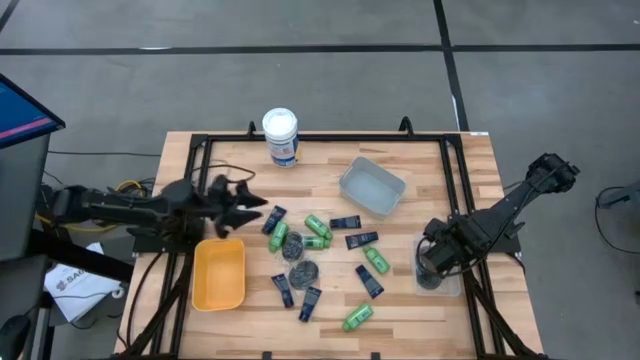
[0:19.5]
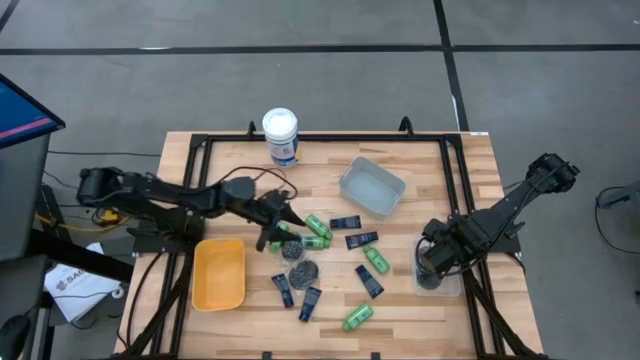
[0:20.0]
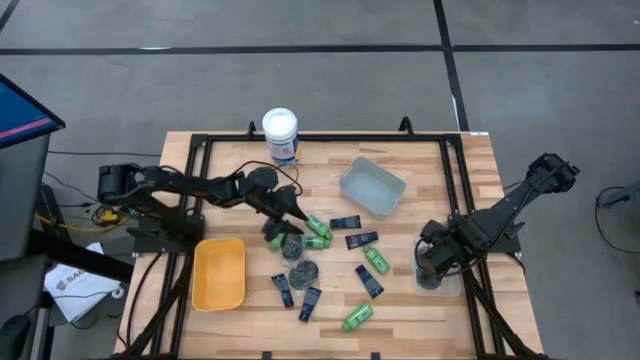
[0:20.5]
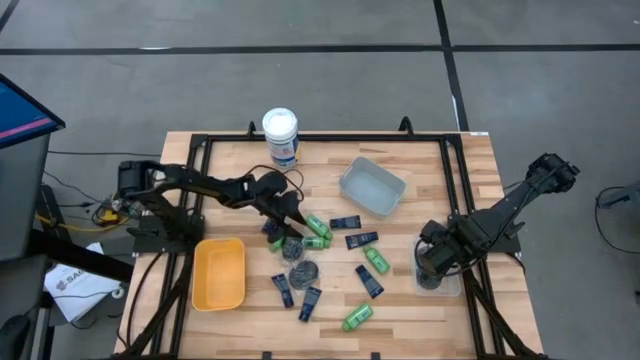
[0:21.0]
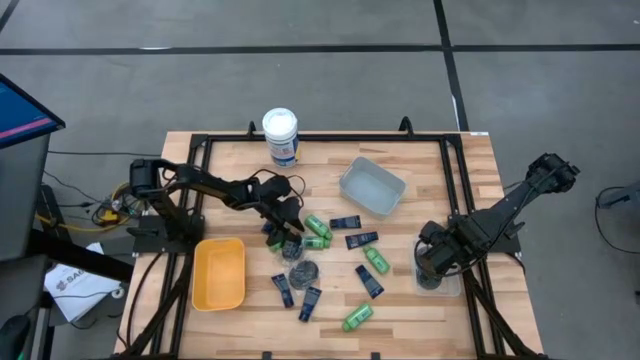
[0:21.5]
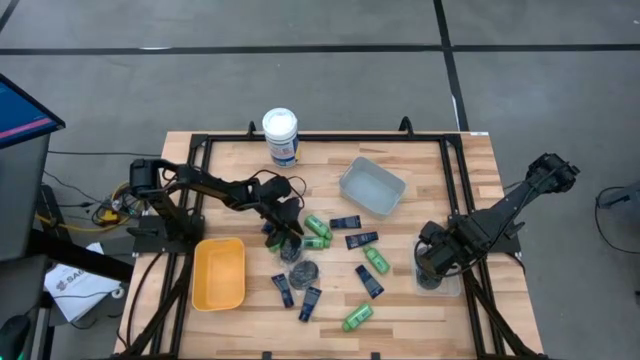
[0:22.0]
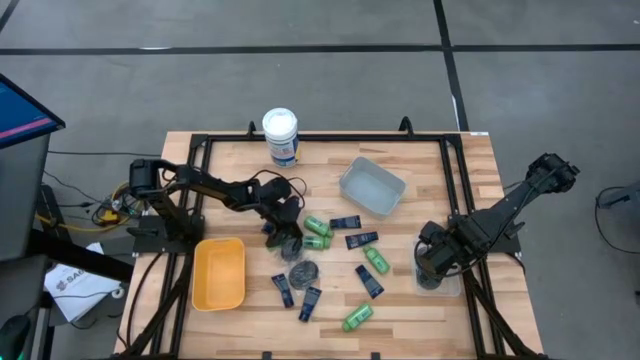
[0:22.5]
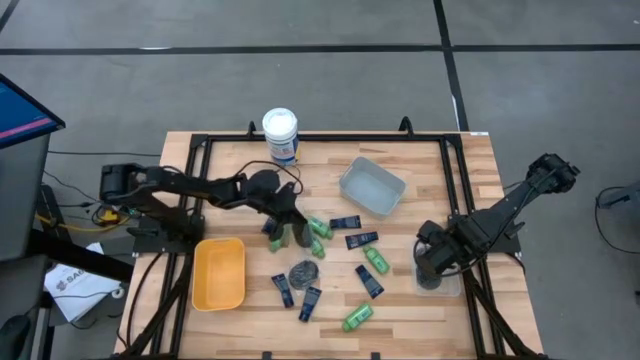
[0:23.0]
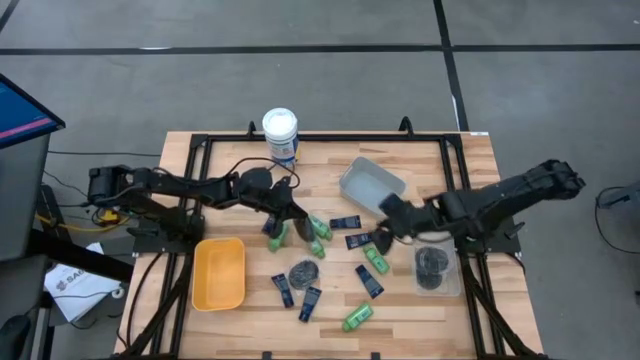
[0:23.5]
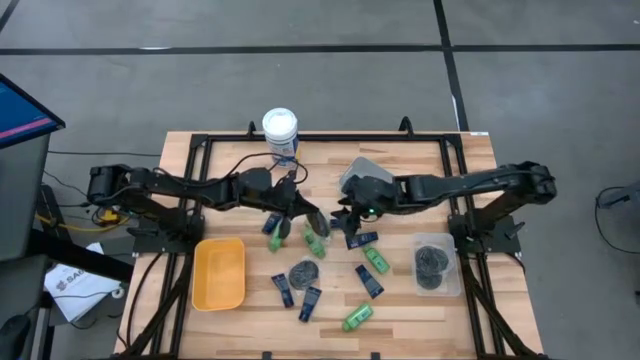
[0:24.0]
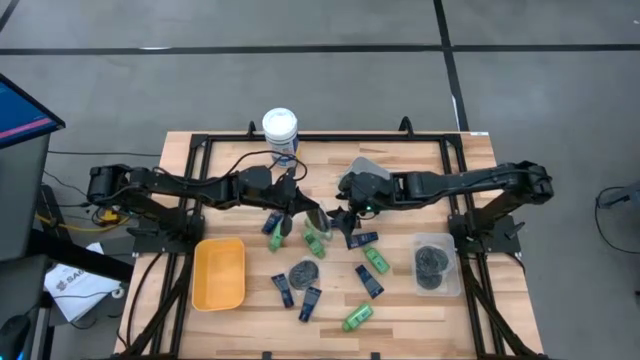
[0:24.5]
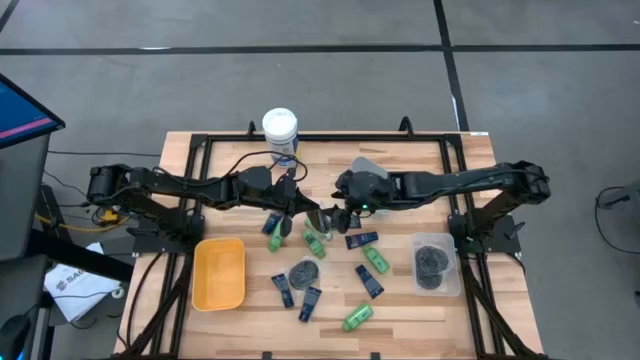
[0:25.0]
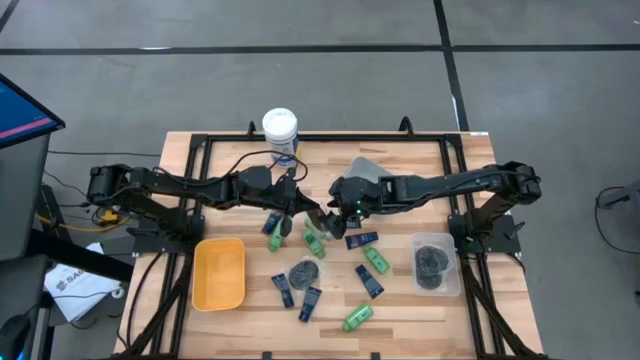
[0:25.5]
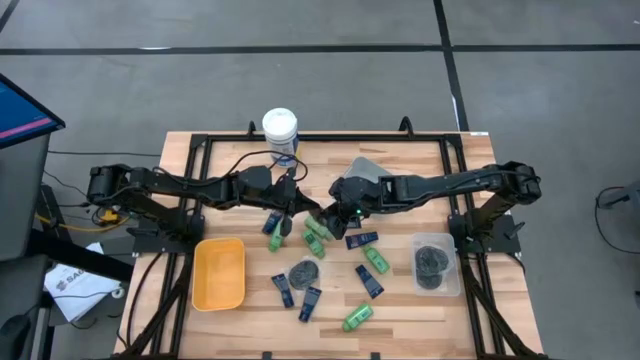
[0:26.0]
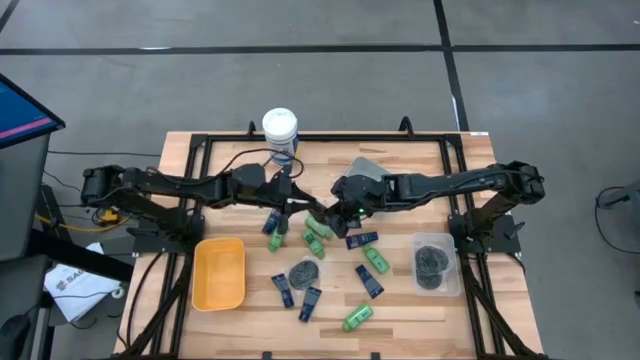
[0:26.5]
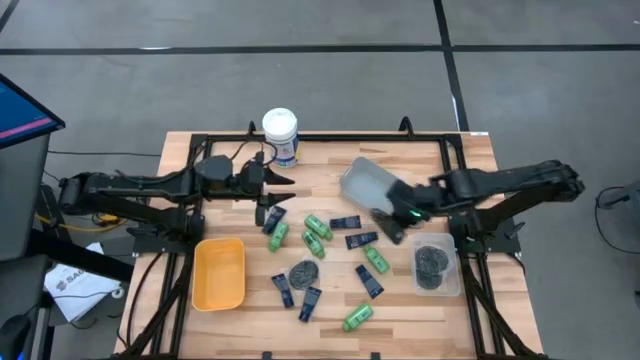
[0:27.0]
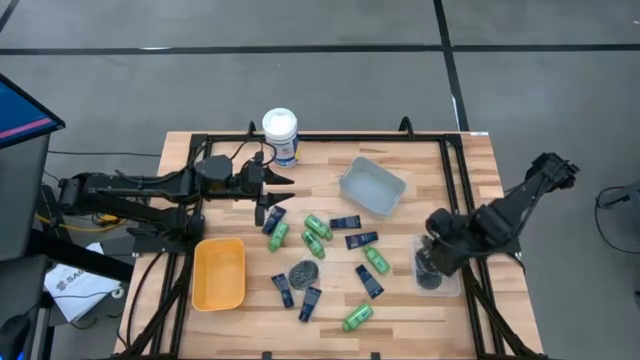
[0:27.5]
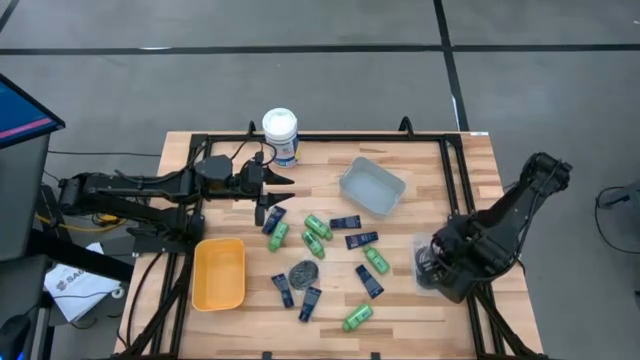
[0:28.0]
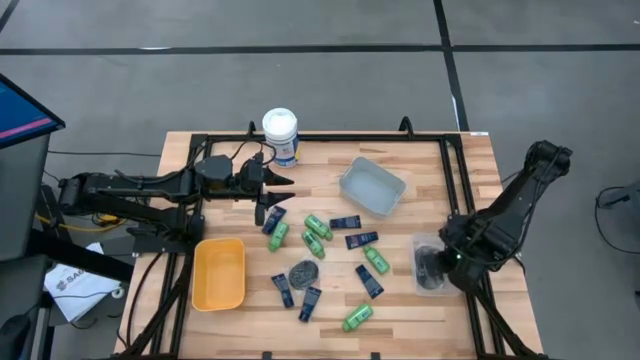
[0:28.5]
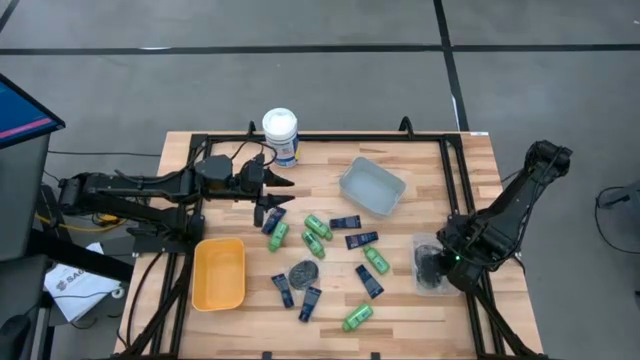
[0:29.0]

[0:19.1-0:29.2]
Task: Pick & Place Travel size toiletries
Put the black hairbrush into the transparent bin

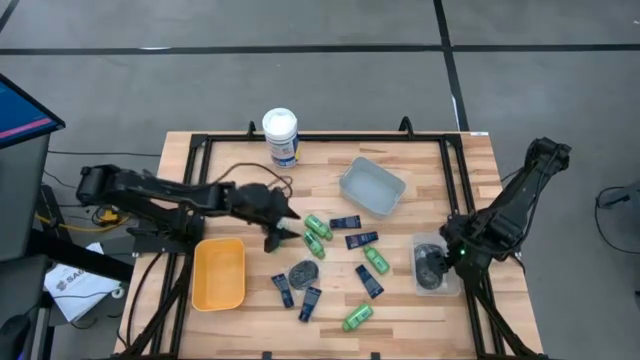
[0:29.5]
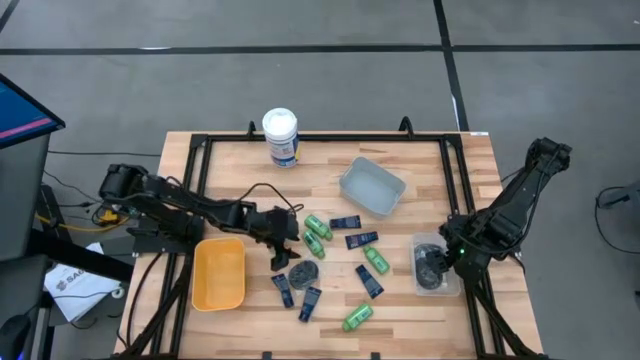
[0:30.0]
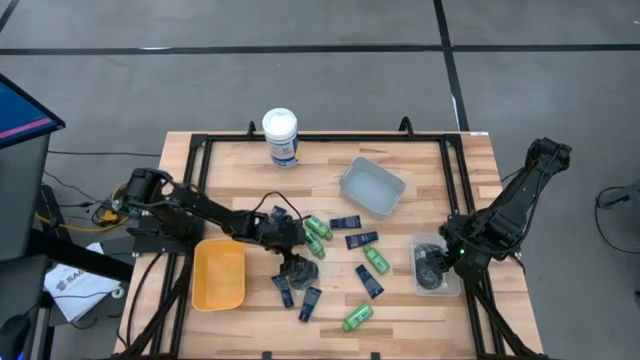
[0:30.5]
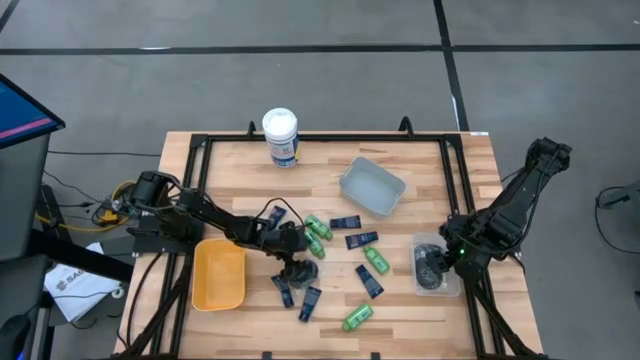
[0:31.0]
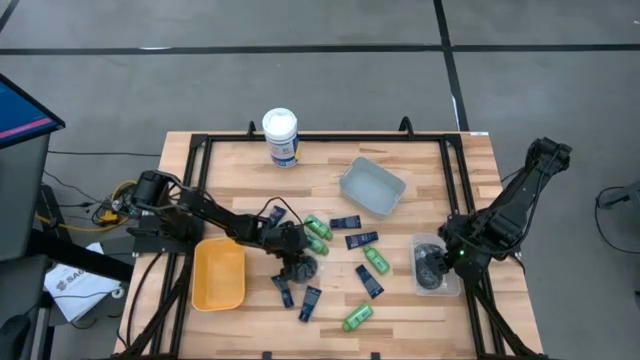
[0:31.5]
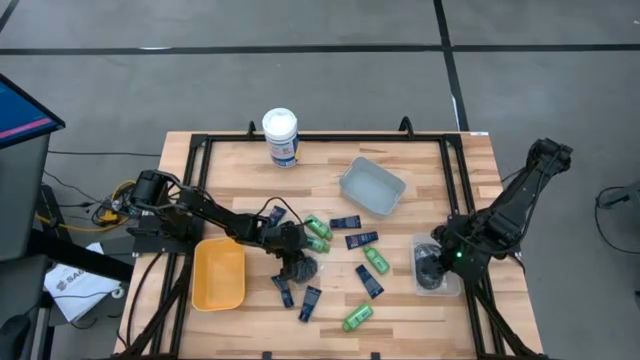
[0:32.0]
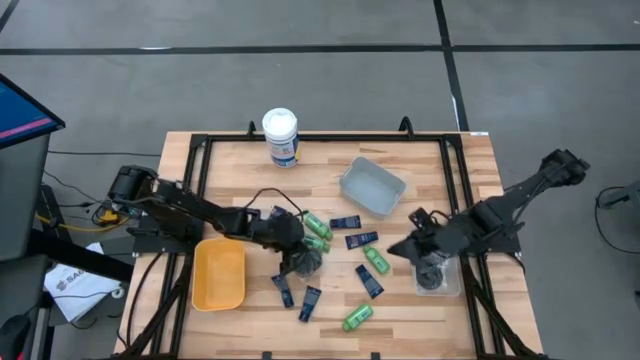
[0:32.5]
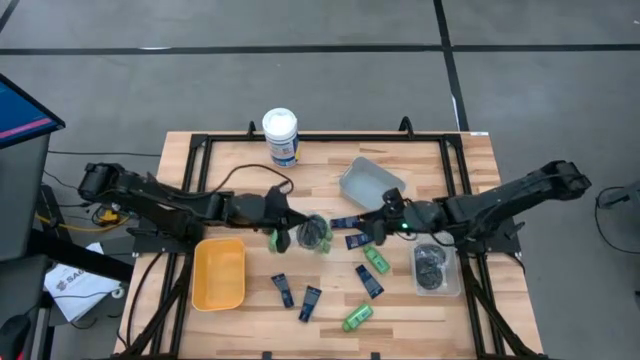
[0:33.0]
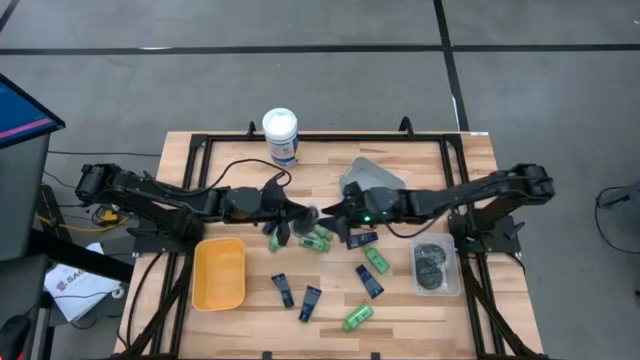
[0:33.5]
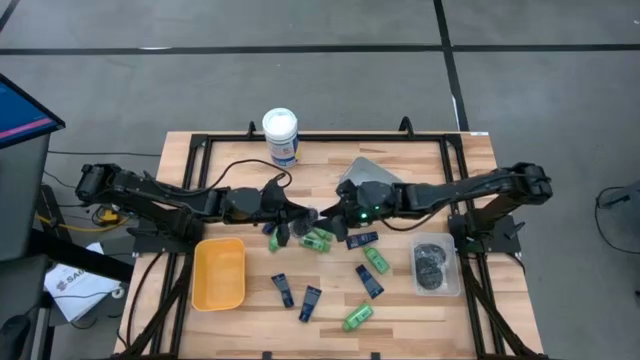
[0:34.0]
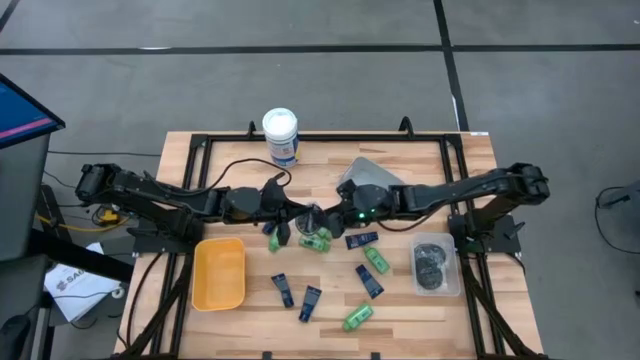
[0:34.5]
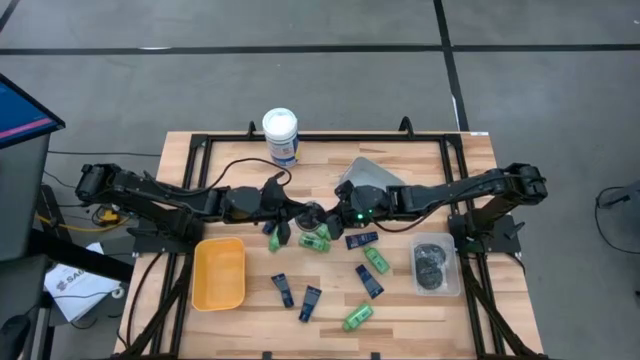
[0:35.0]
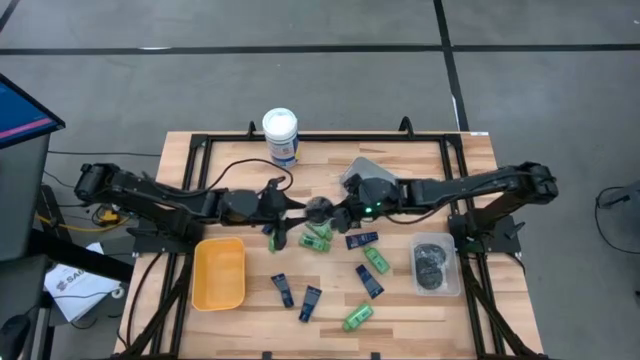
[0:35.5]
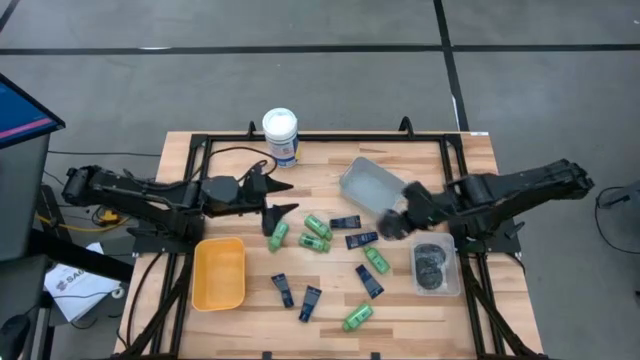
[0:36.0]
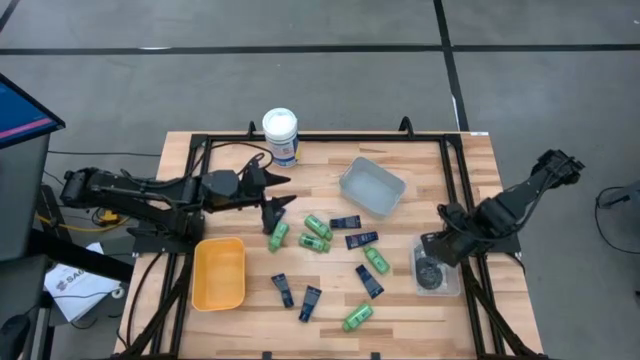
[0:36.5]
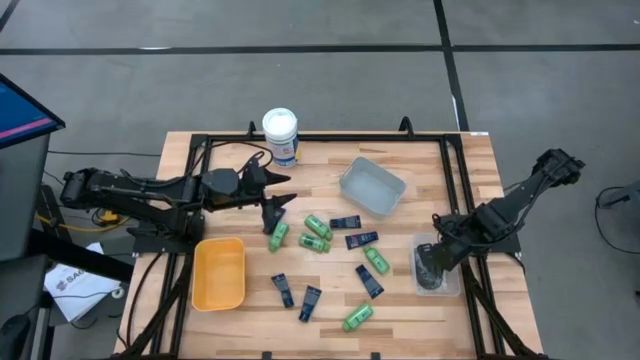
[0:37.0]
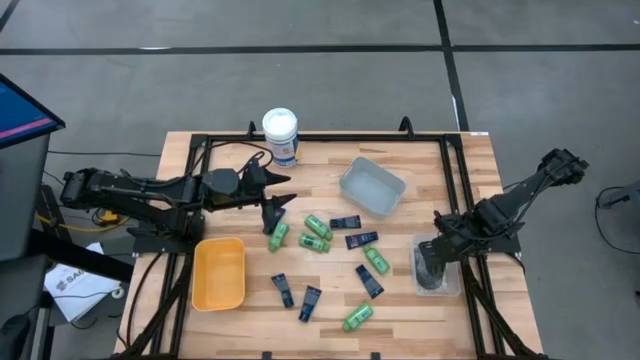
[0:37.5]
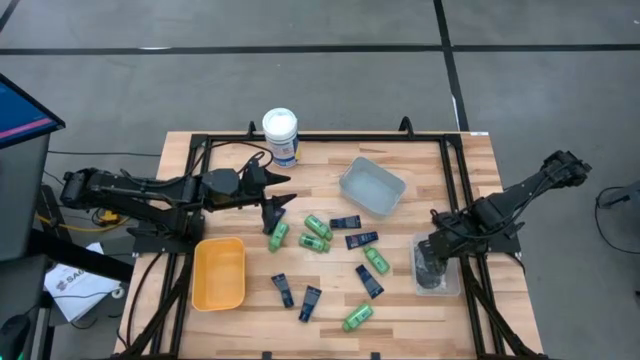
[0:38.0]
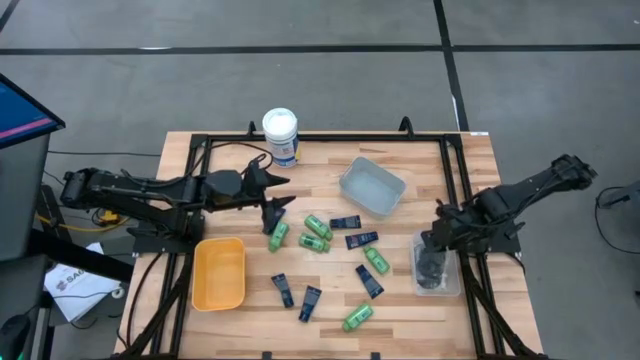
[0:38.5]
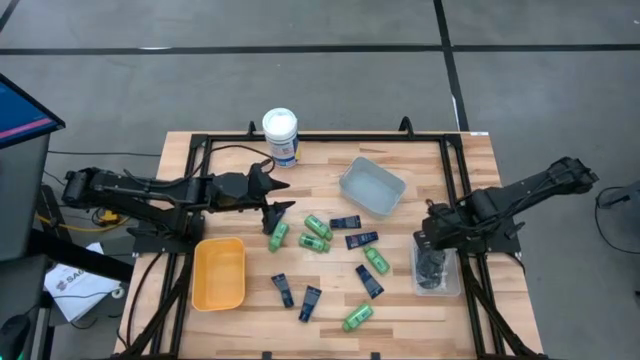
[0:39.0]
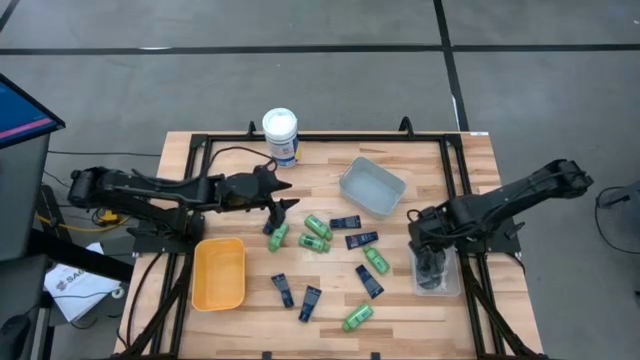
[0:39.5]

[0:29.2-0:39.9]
Put the black hairbrush into the transparent bin

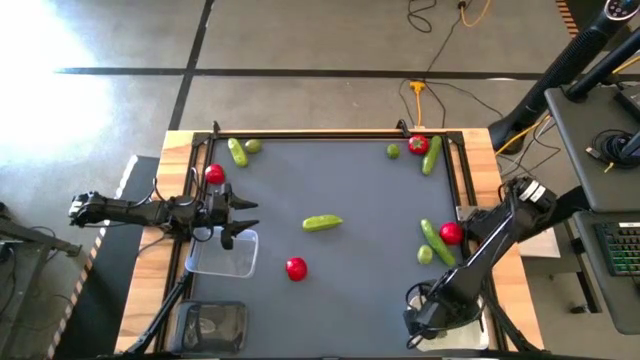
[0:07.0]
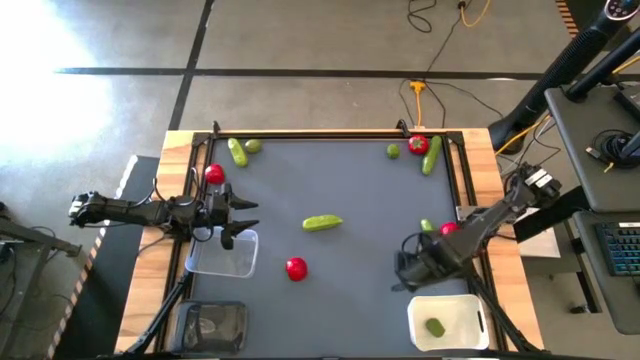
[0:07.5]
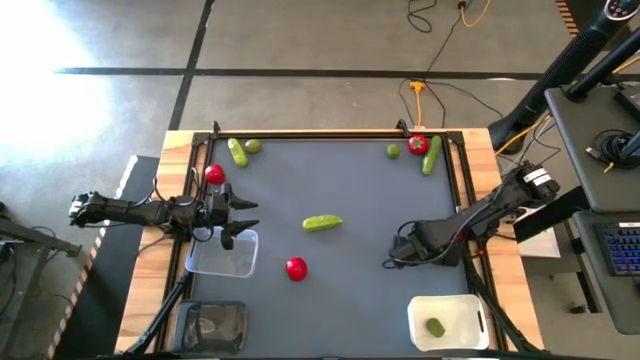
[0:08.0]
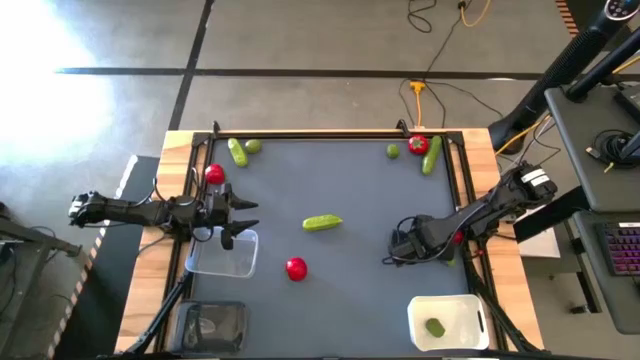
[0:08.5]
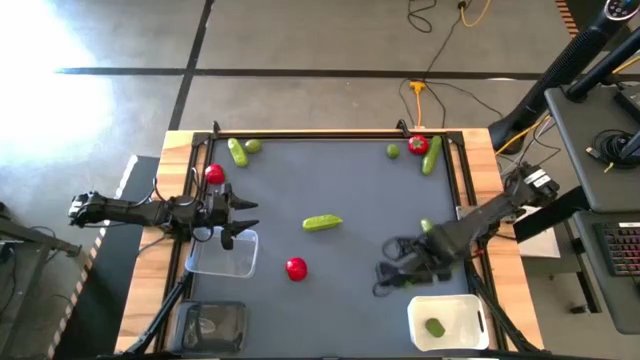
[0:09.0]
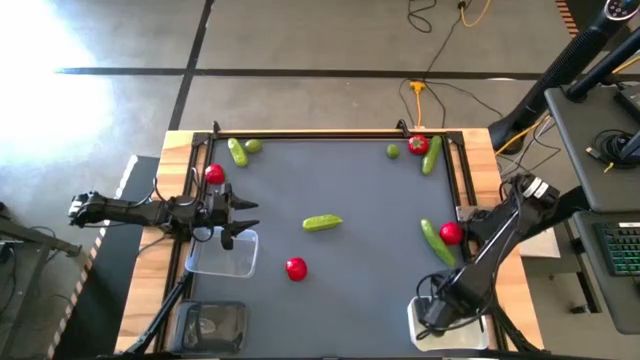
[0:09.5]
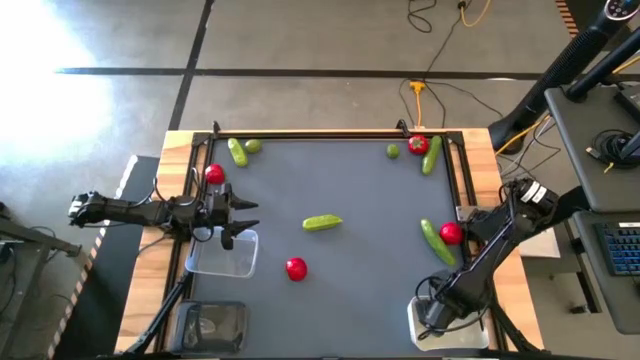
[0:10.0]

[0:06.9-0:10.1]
Task: Sort produce into baskets
Put the bottom lime into the white bin
